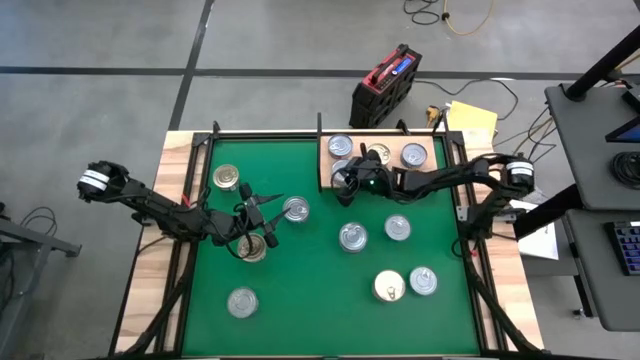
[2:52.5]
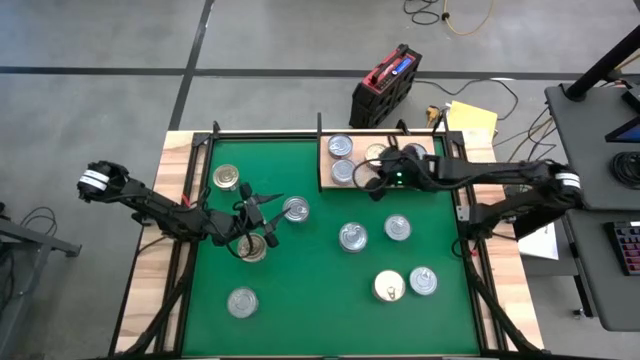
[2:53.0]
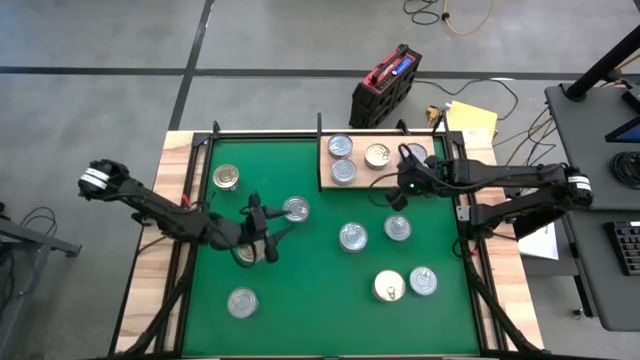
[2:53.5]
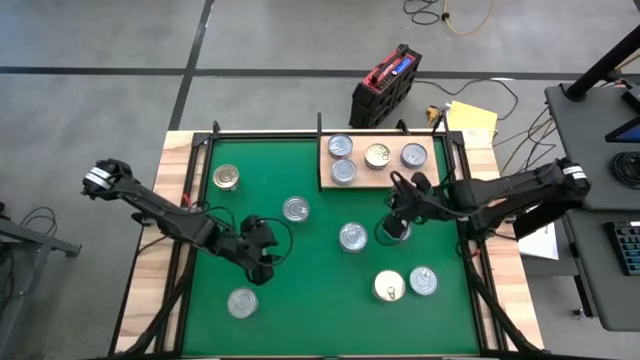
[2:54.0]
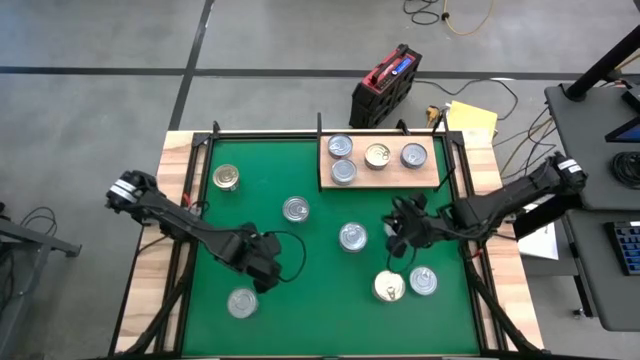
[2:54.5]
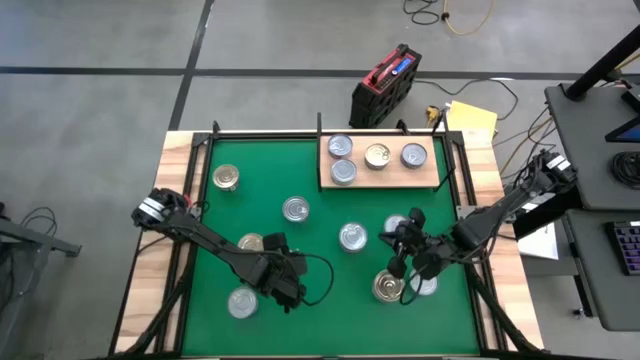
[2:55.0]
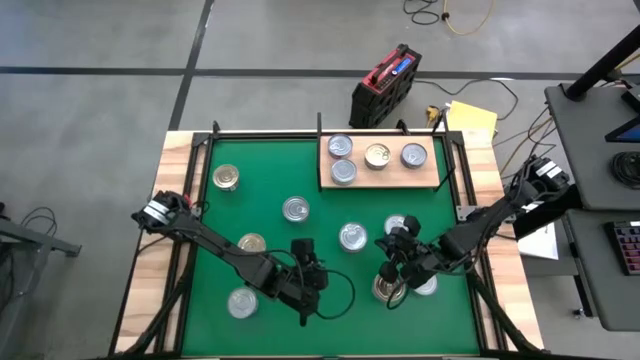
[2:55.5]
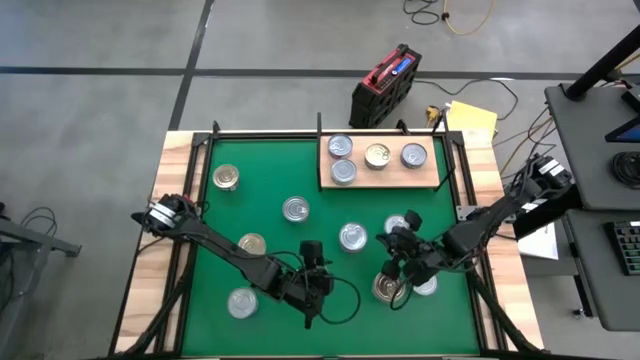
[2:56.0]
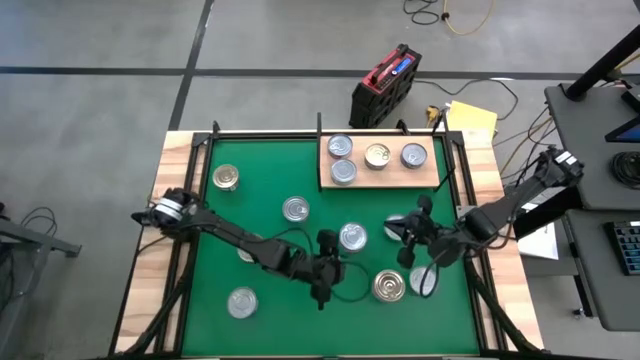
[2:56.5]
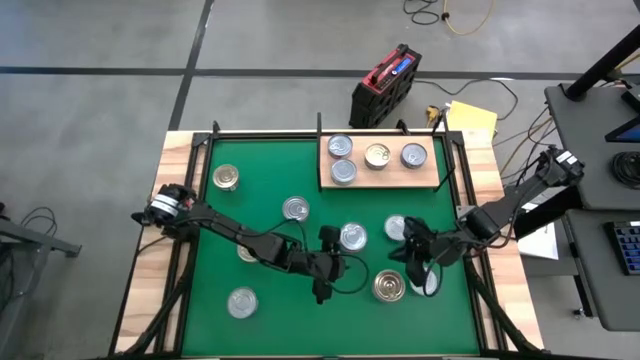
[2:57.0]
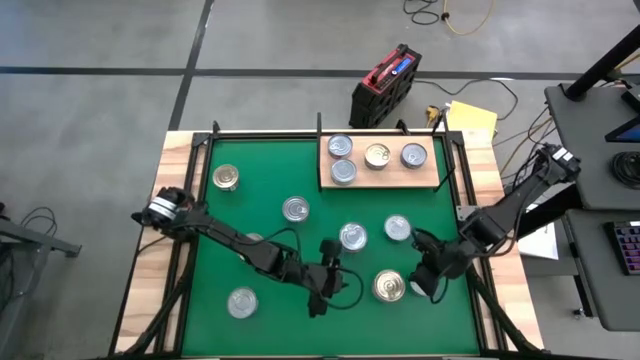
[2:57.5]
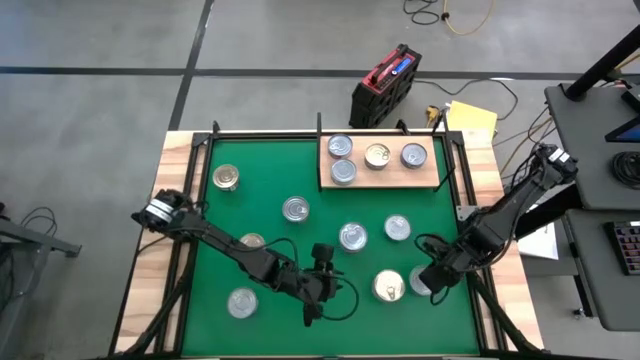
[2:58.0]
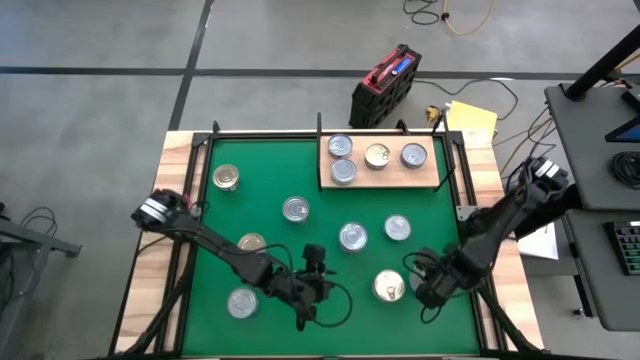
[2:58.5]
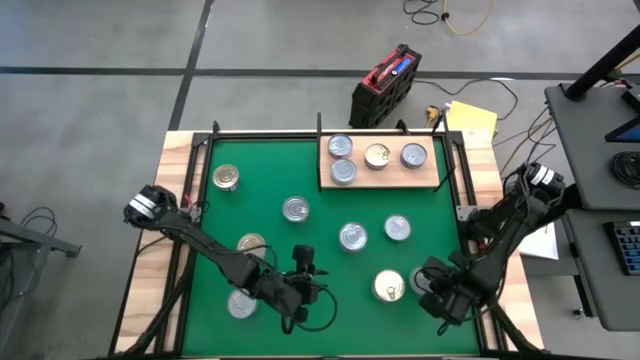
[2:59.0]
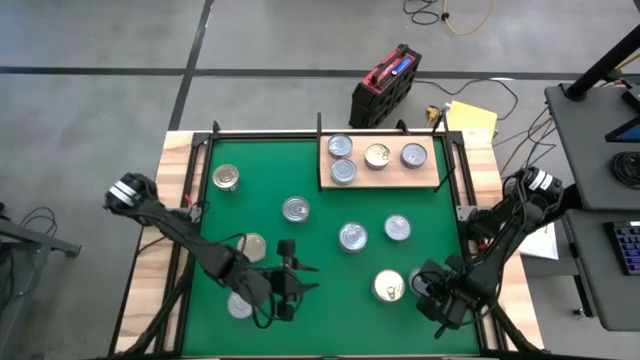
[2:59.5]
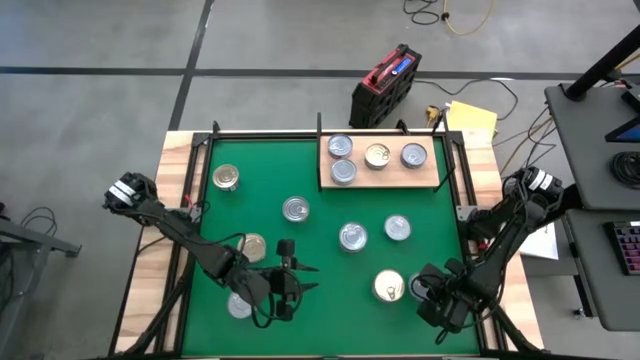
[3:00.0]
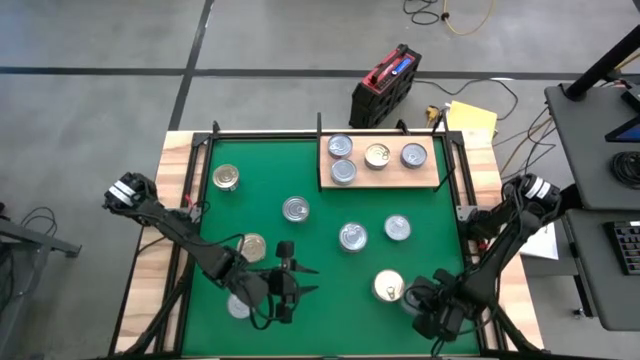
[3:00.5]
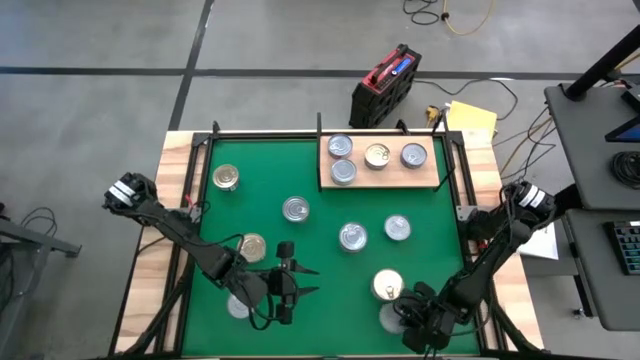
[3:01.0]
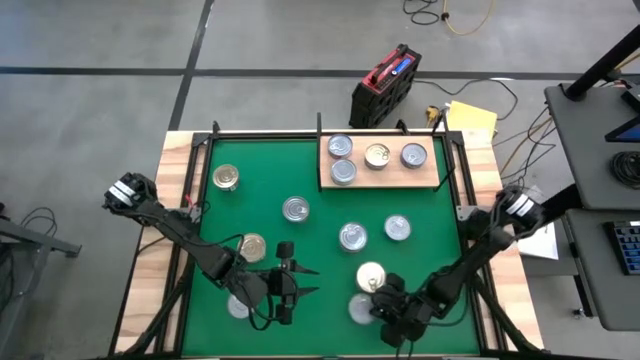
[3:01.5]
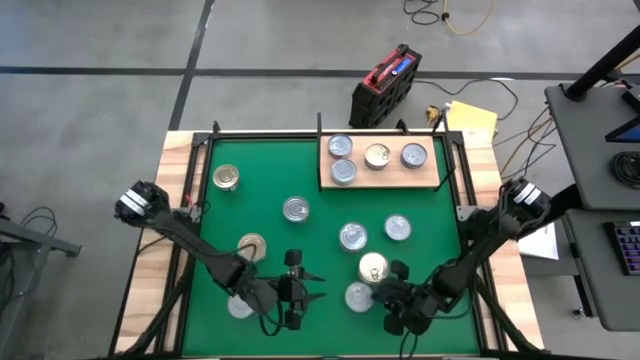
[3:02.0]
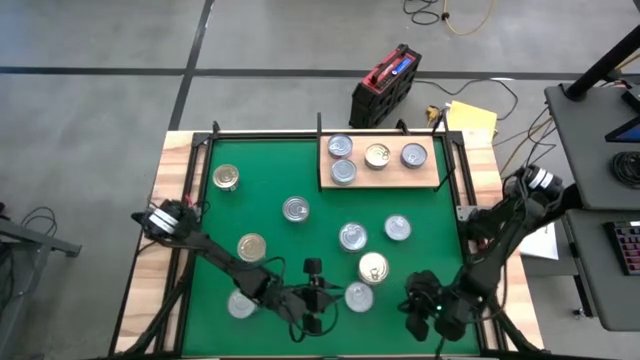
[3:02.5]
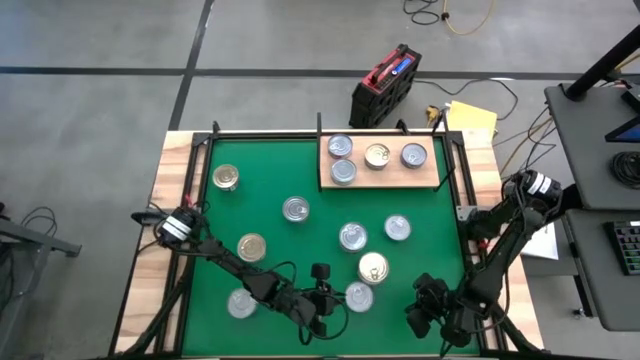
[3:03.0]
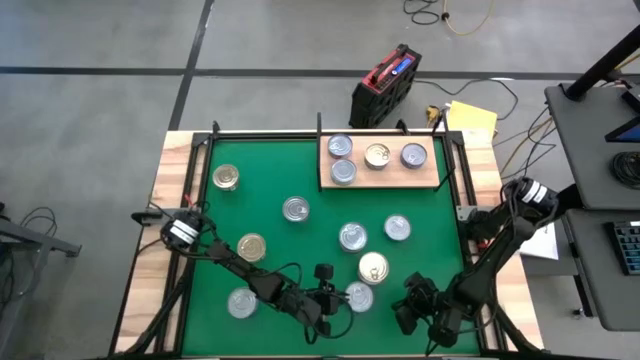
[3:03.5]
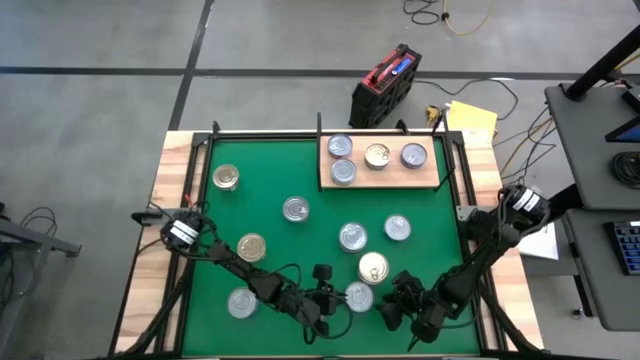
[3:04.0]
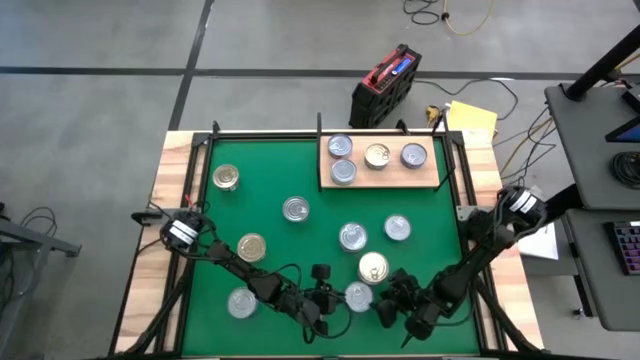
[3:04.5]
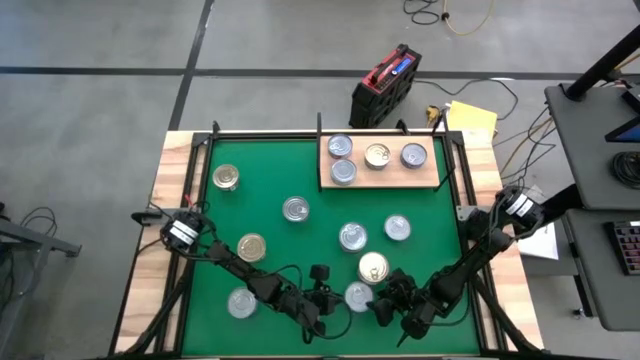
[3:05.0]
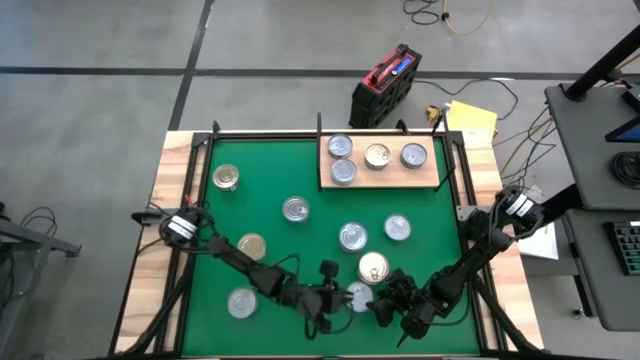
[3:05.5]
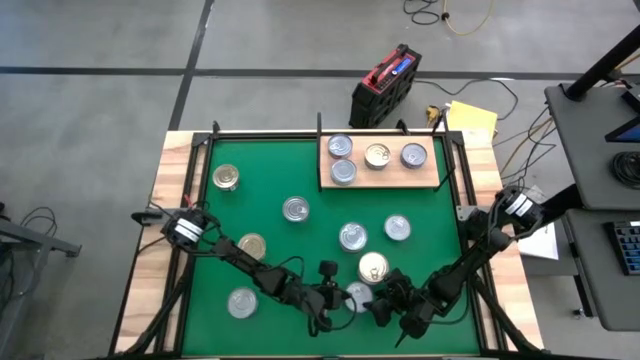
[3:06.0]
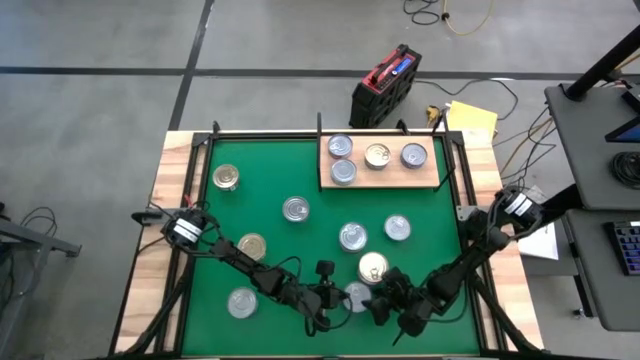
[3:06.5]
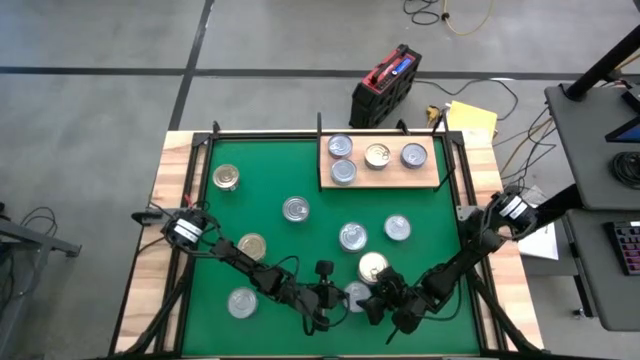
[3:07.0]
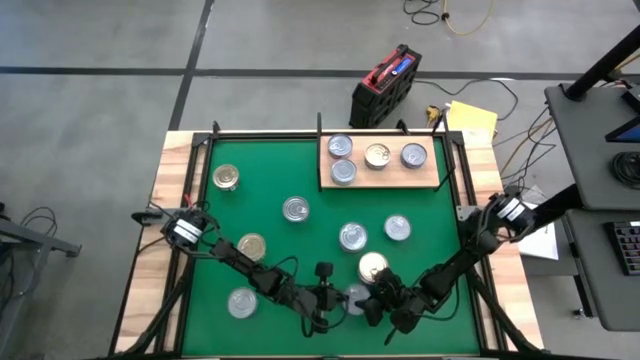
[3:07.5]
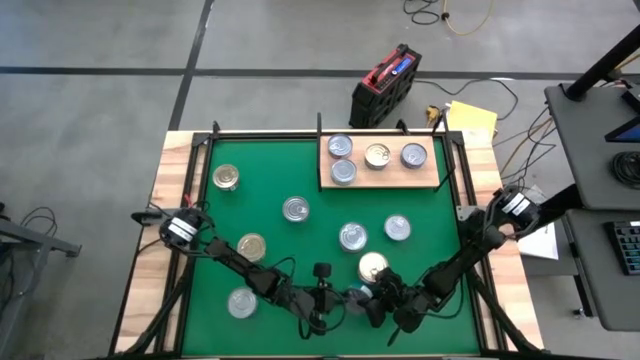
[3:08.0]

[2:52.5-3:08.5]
Task: Stack canned seafood by type on shelf
Put the green/blue tuna can on the shelf

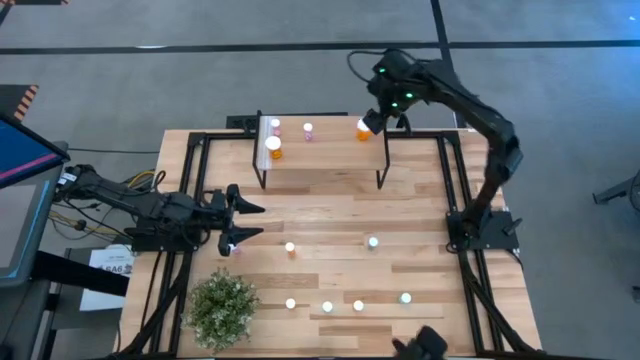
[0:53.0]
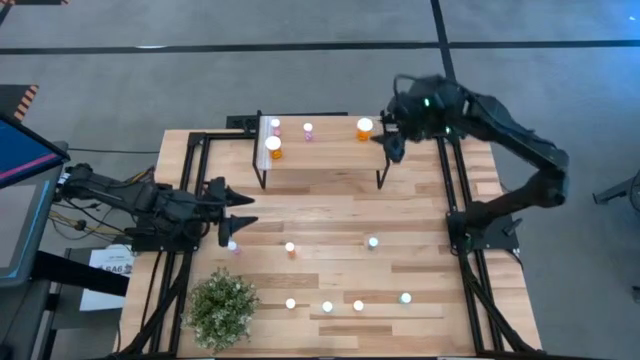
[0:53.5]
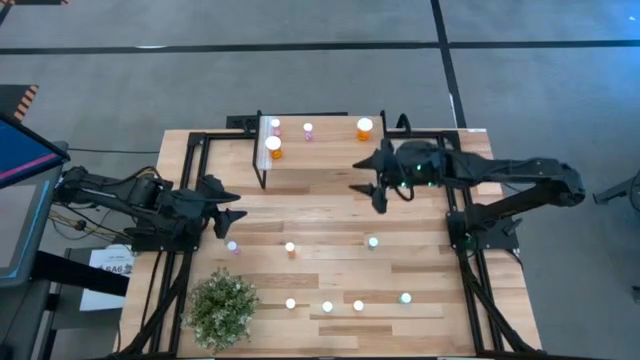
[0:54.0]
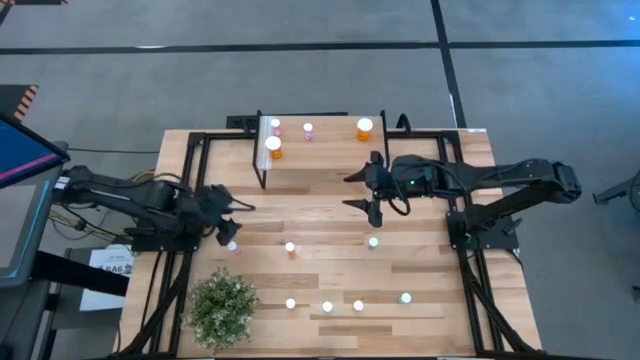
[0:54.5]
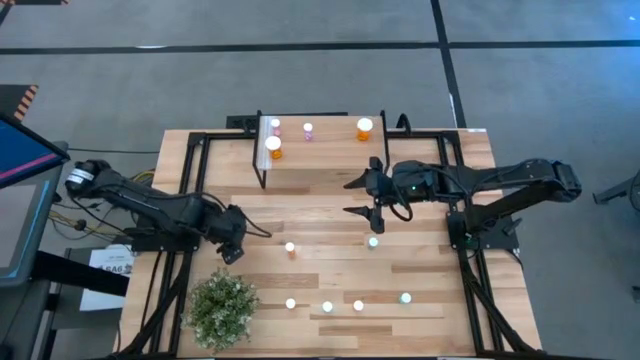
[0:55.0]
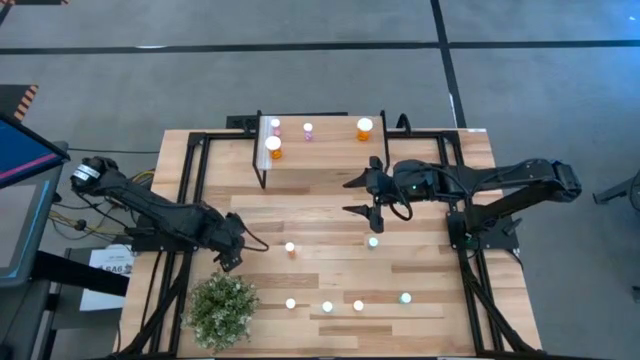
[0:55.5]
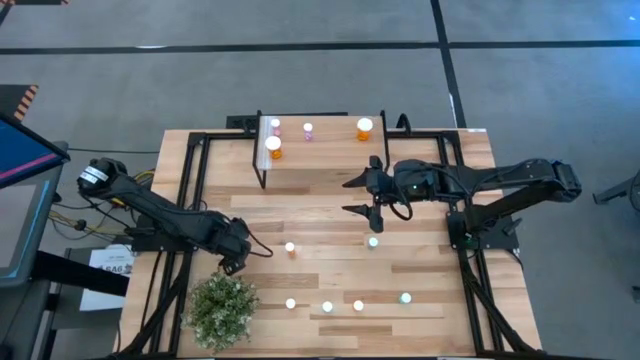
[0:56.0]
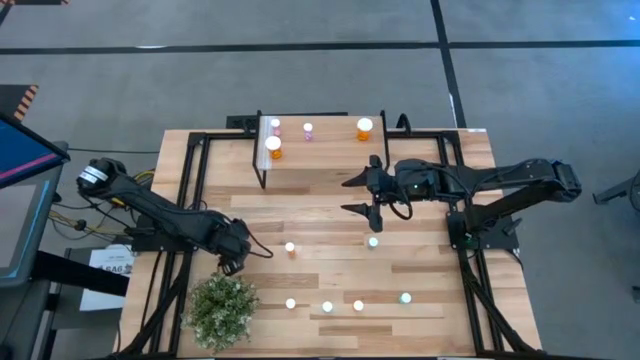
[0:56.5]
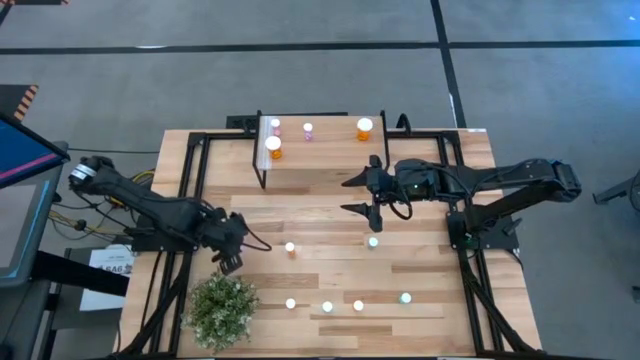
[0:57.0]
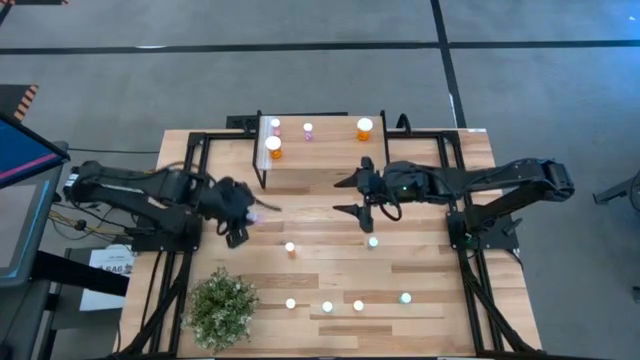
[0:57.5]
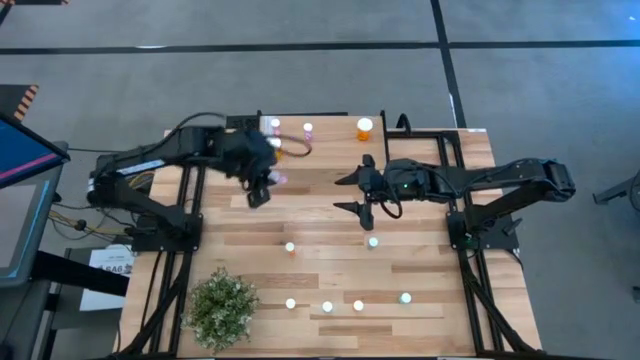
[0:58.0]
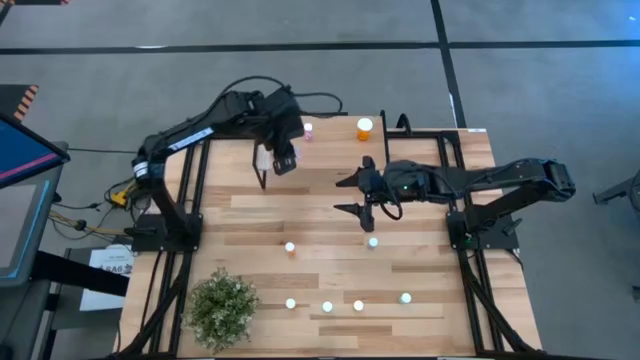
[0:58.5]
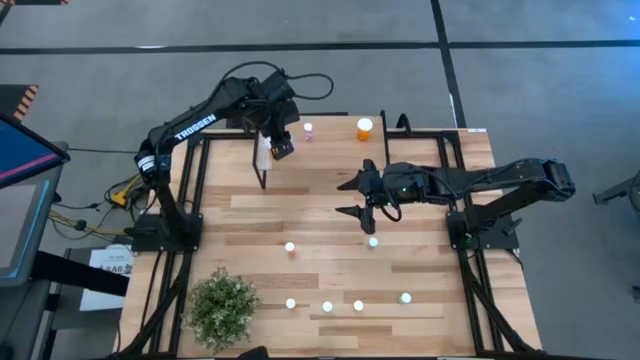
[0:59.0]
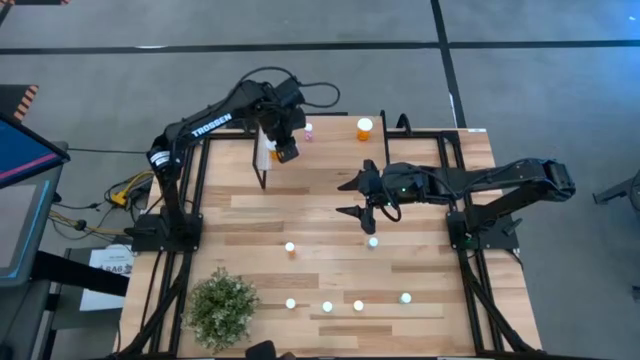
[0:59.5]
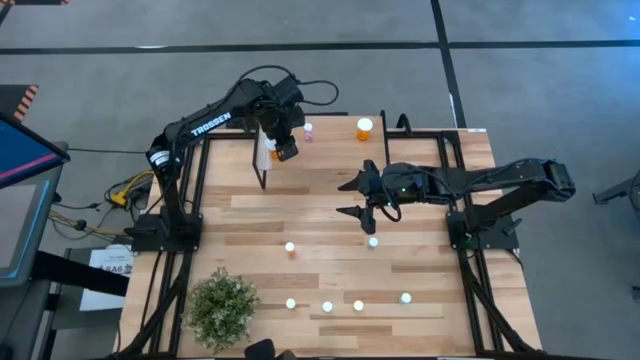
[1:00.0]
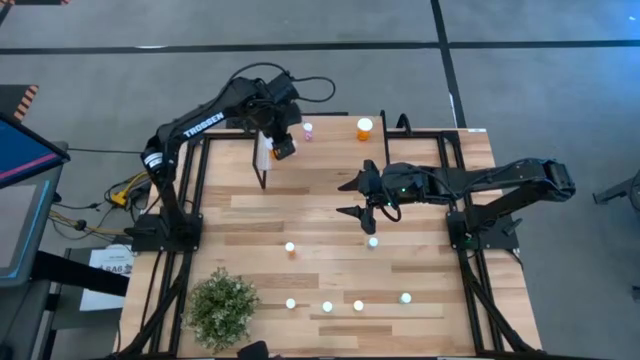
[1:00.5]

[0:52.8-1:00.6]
Task: Pick and place medicine bottles onto shelf by color
Put the small pink pill bottle on the shelf
